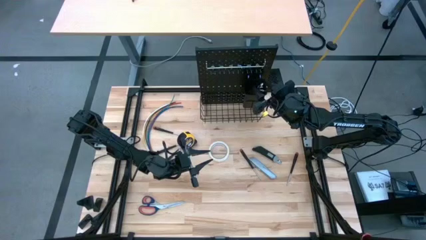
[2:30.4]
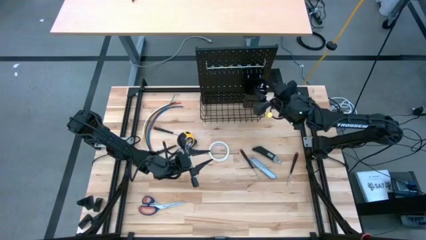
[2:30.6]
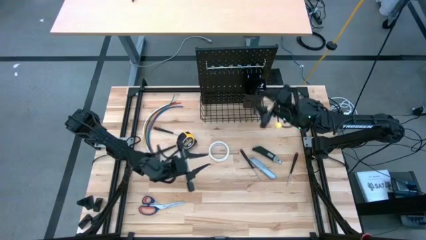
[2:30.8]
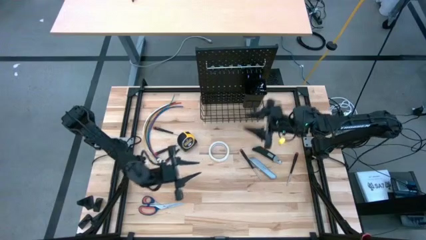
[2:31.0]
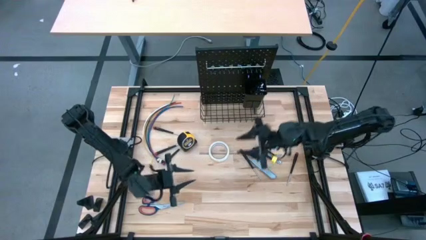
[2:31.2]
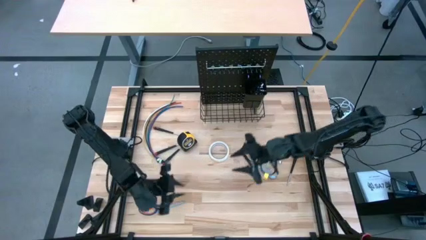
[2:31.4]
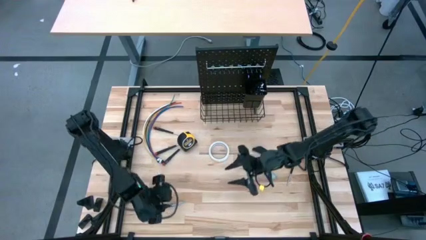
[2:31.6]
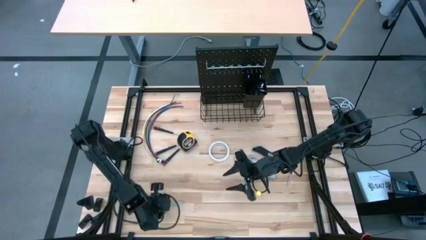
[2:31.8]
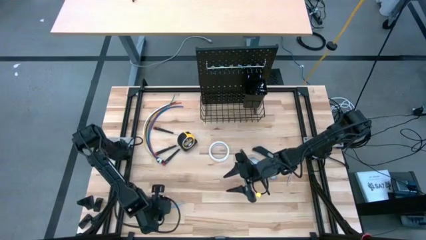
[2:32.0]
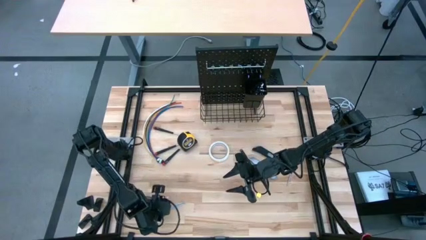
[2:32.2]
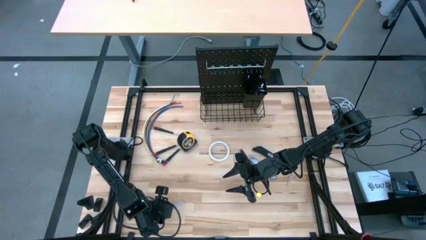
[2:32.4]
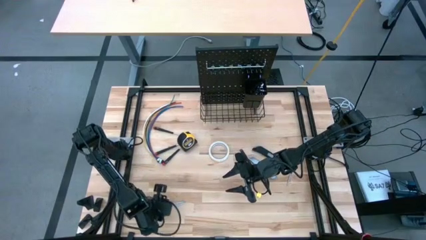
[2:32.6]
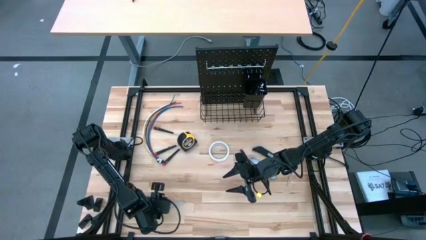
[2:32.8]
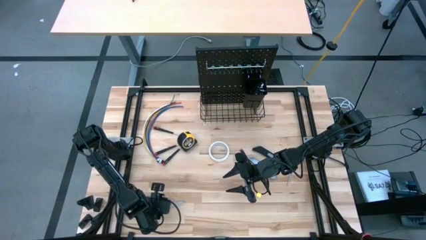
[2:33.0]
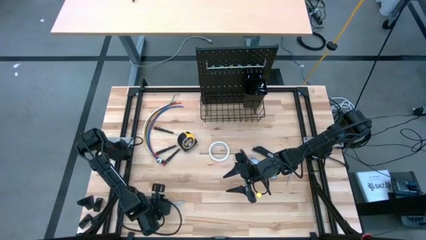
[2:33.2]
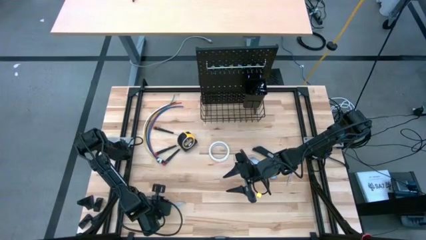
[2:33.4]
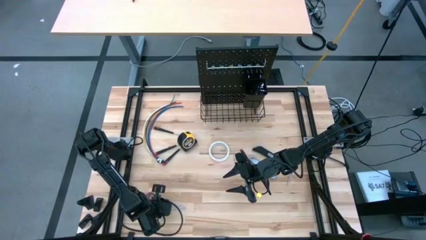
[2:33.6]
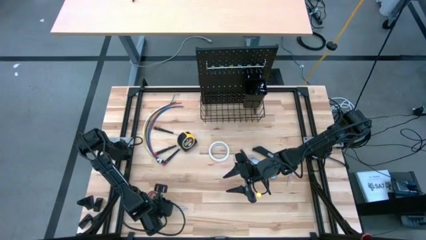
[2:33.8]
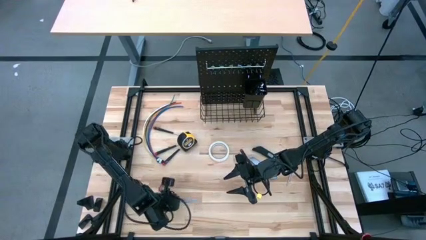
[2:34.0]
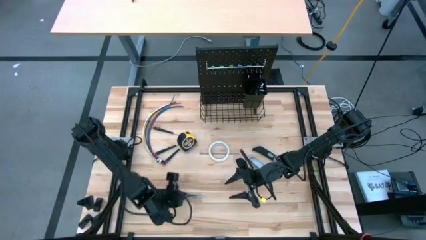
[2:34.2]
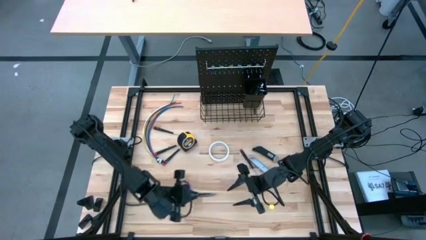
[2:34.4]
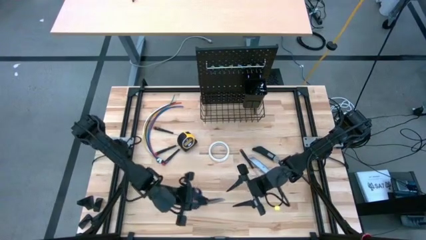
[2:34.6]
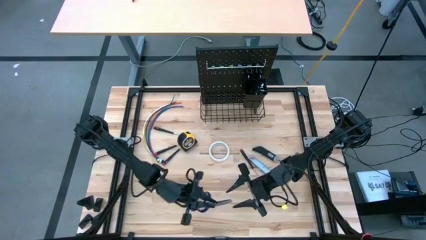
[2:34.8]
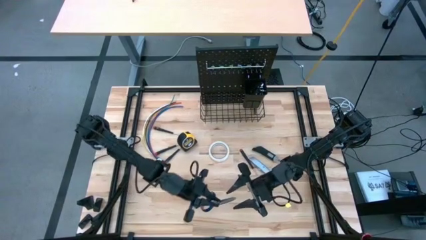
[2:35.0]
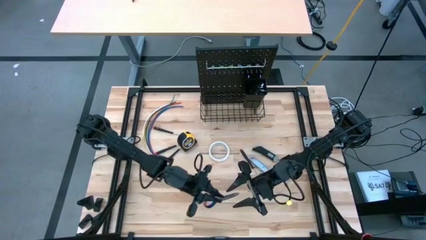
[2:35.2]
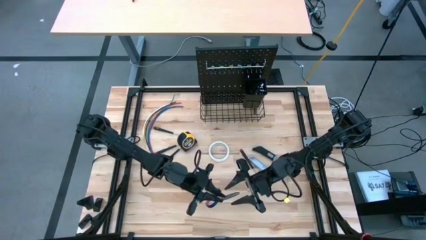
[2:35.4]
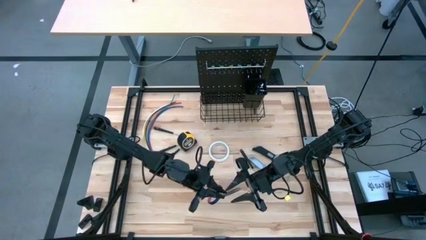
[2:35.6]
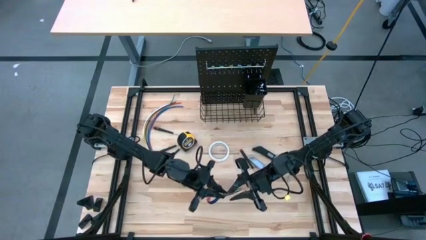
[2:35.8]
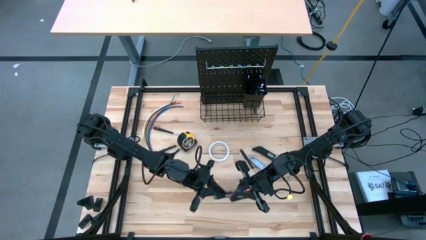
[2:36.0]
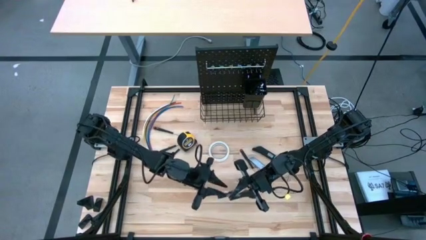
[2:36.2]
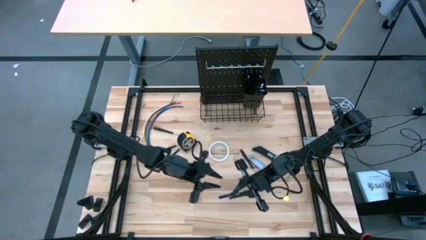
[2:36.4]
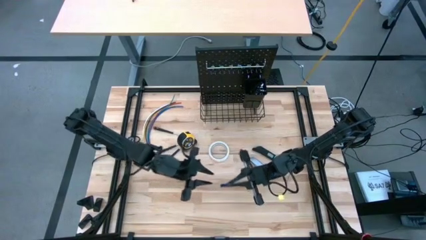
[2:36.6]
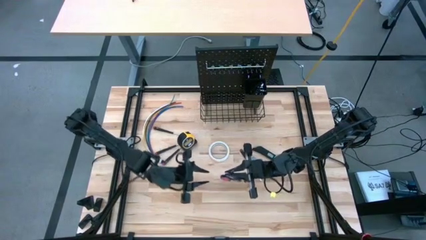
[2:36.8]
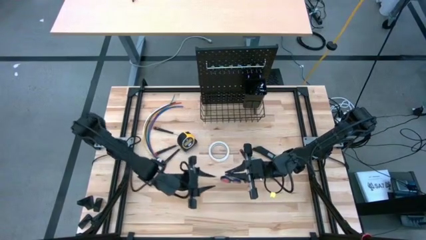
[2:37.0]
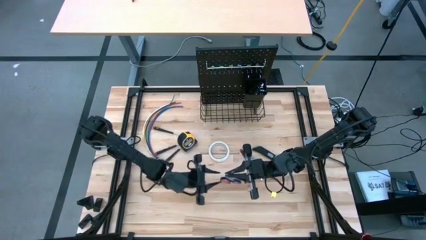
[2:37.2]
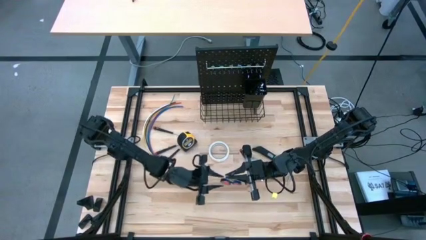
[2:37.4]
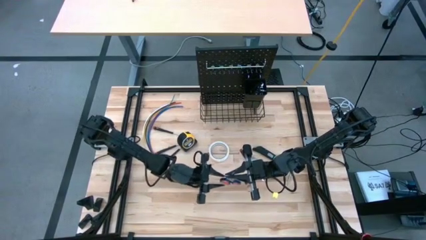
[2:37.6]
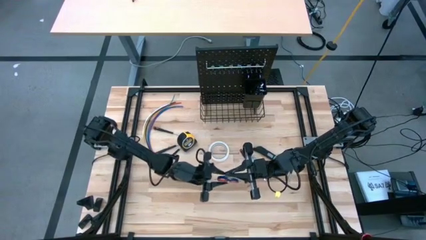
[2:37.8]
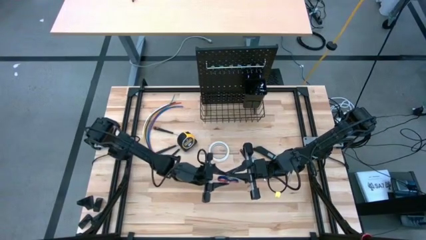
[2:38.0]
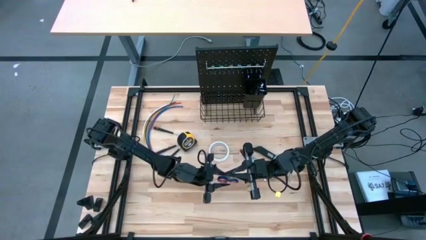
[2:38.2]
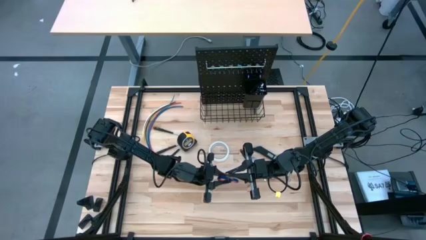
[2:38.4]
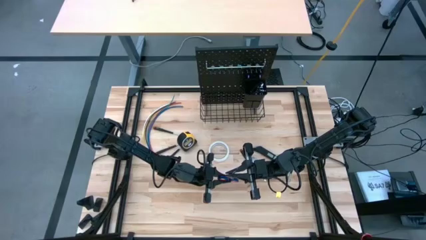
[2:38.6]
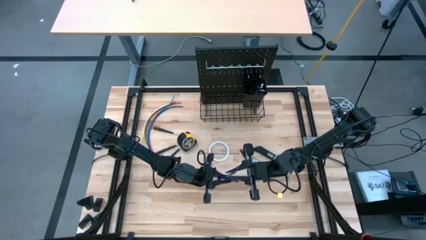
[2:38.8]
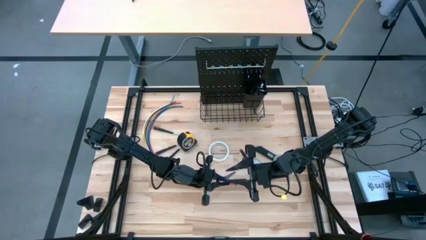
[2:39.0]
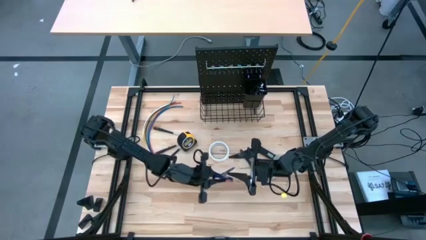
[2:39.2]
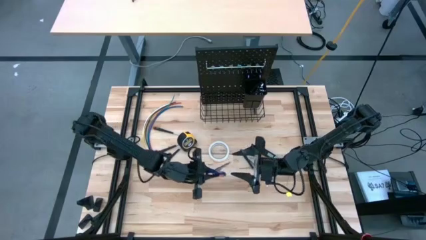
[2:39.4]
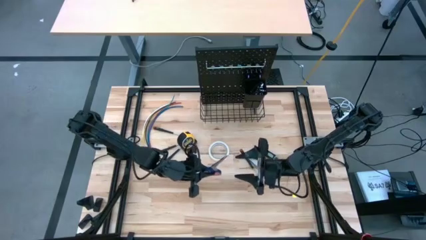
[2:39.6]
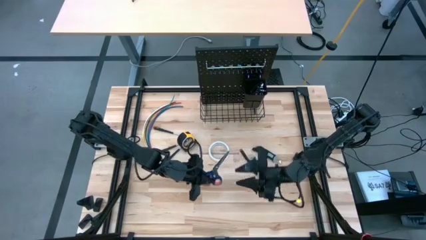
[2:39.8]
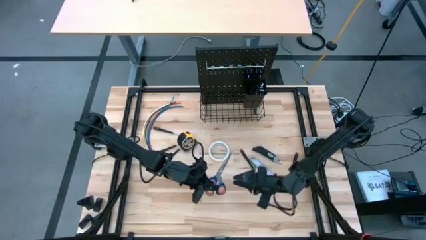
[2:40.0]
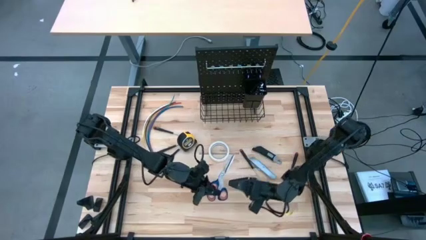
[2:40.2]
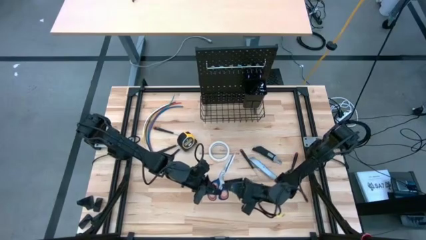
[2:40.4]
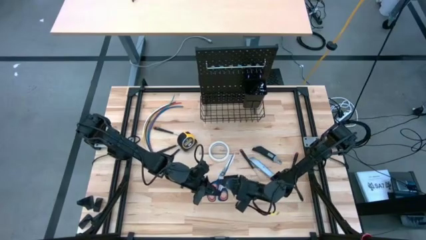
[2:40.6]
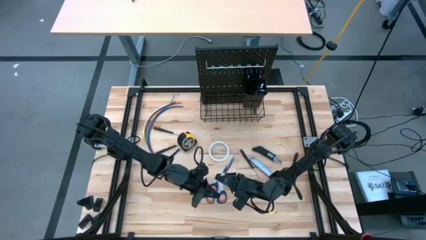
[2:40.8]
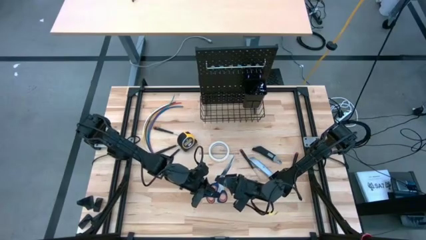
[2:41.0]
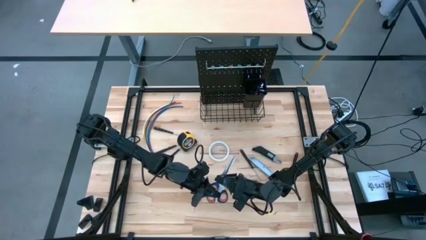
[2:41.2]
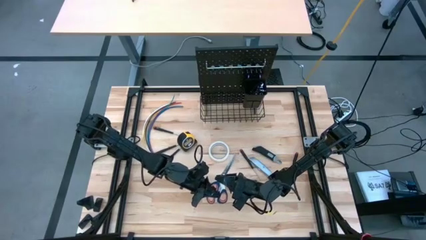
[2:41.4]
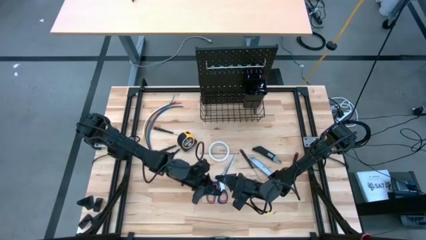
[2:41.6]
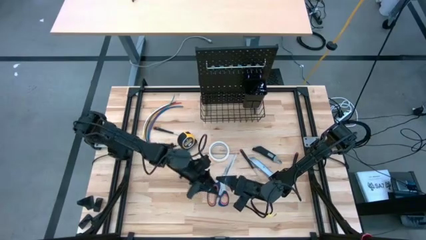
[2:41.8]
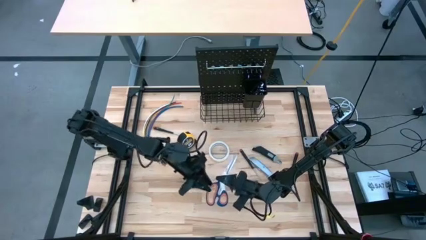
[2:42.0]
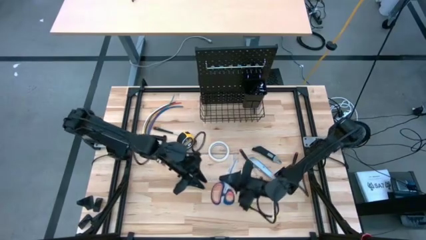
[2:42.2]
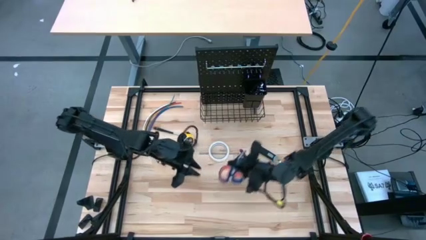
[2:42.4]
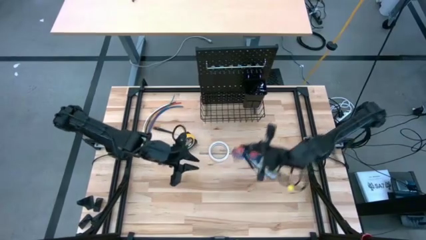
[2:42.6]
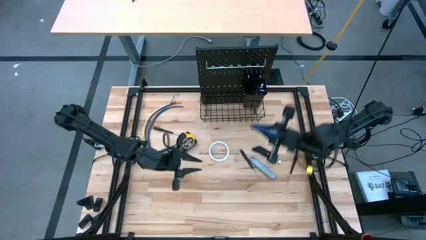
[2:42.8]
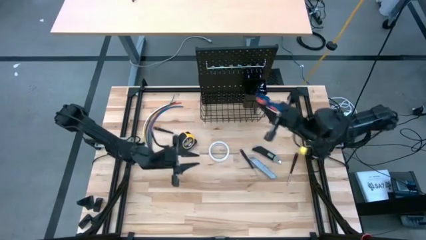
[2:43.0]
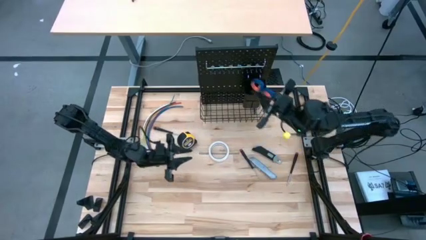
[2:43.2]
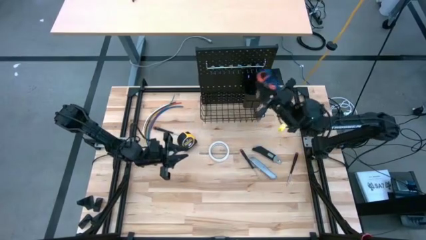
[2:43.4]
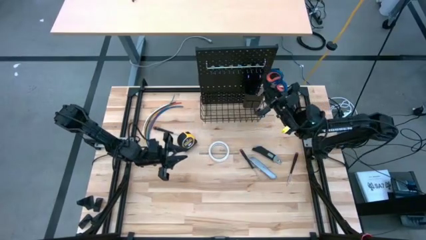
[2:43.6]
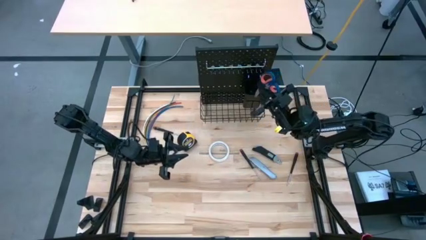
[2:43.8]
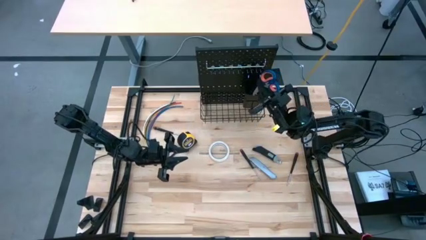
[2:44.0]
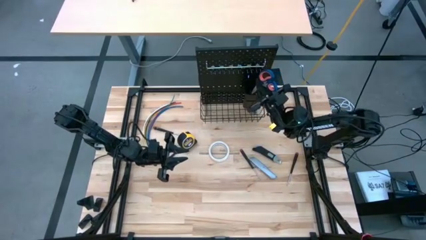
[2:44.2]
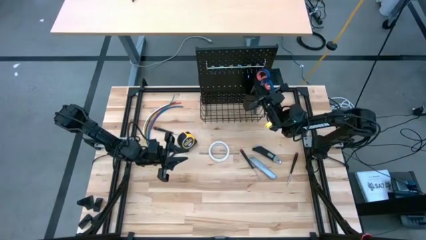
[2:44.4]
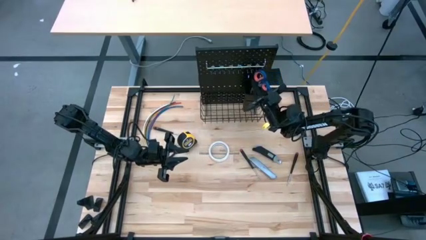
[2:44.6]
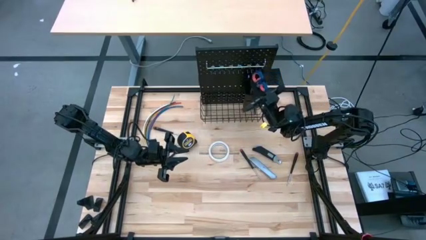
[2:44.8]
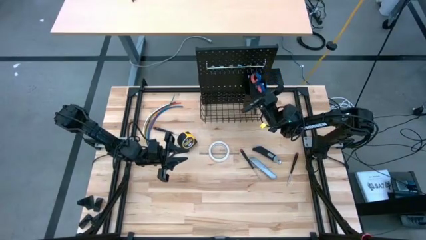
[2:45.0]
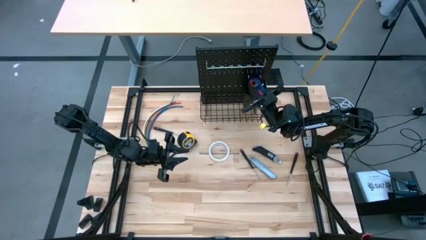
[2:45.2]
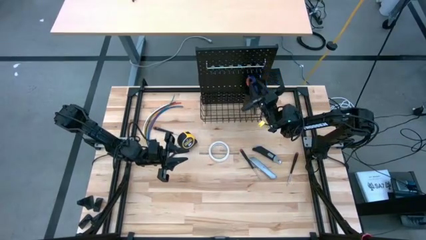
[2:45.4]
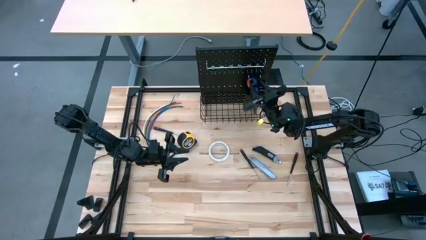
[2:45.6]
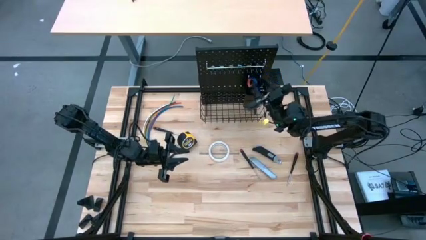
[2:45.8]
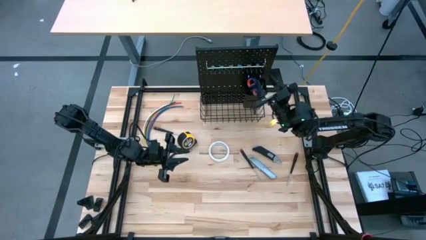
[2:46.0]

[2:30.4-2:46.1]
Task: Hang tools onto peg board
Put the blue scissors into the black bin on the peg board
